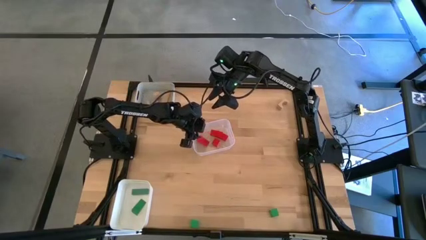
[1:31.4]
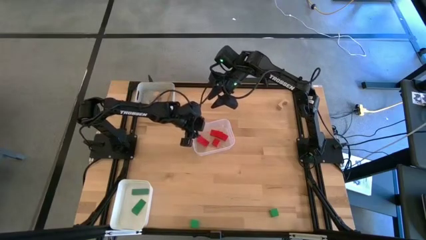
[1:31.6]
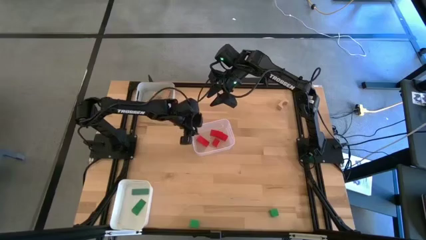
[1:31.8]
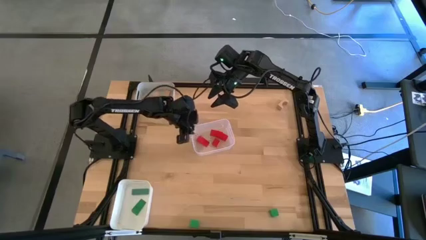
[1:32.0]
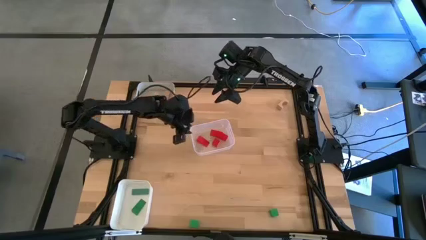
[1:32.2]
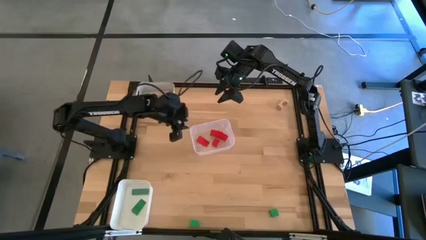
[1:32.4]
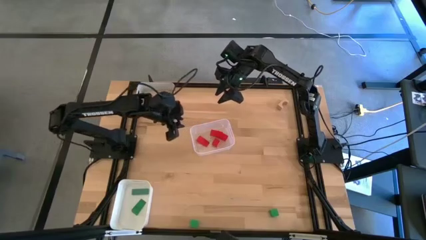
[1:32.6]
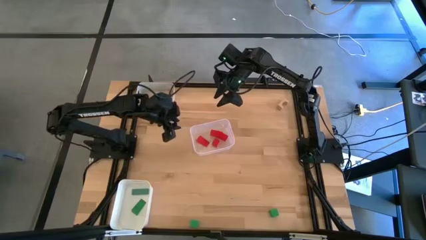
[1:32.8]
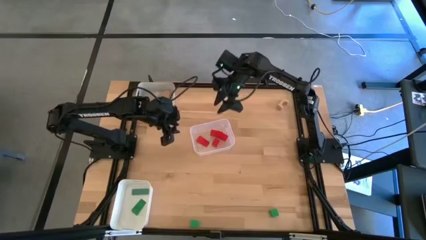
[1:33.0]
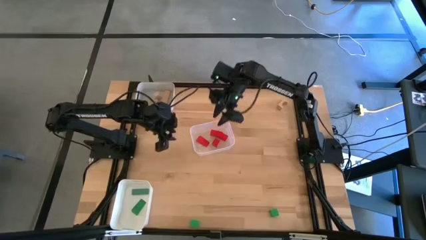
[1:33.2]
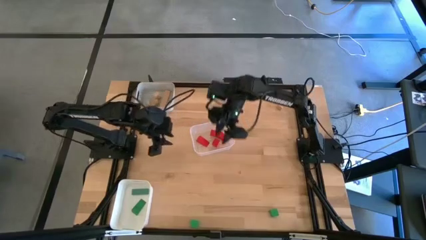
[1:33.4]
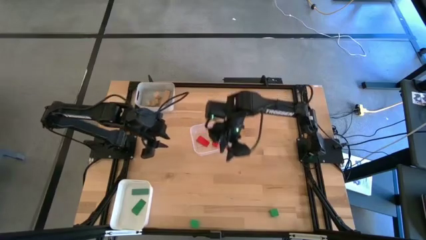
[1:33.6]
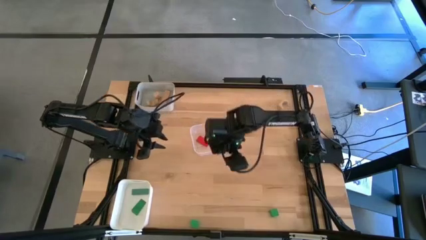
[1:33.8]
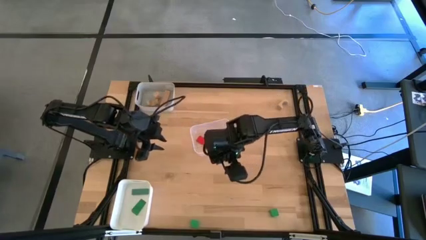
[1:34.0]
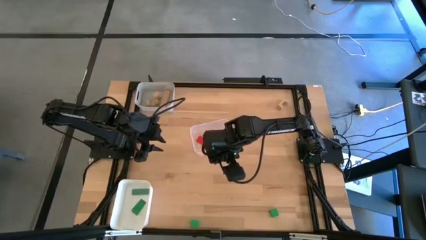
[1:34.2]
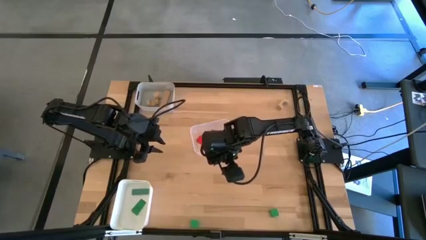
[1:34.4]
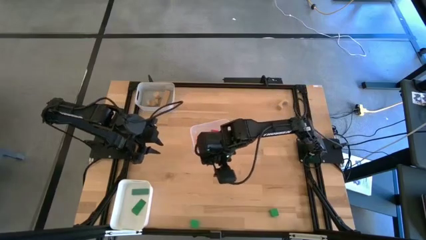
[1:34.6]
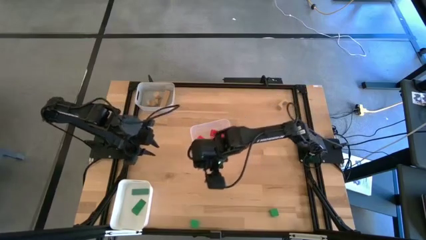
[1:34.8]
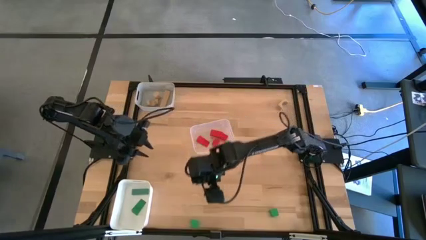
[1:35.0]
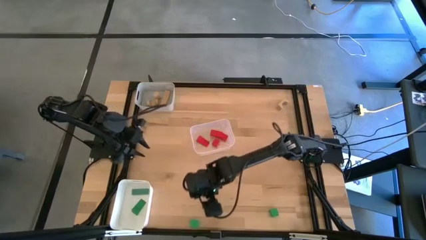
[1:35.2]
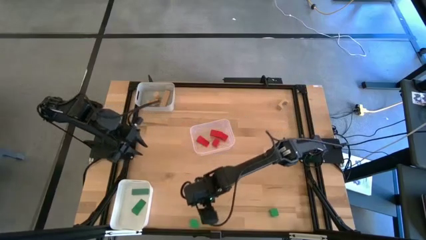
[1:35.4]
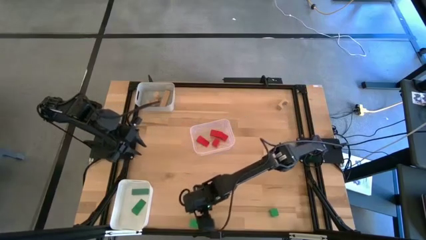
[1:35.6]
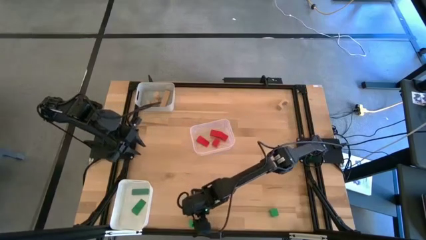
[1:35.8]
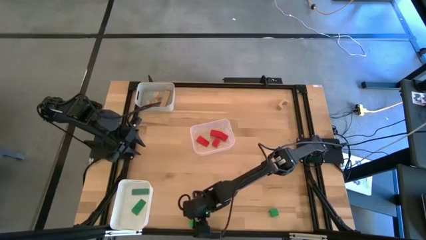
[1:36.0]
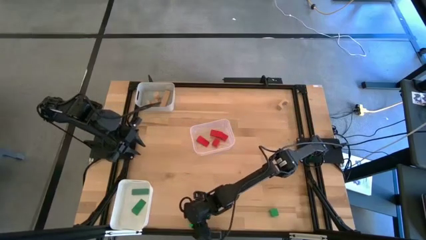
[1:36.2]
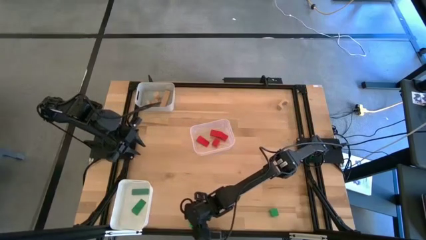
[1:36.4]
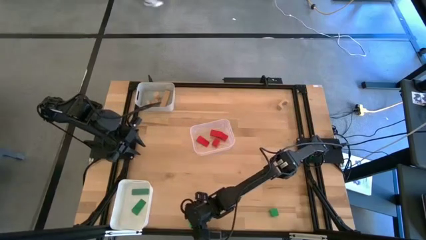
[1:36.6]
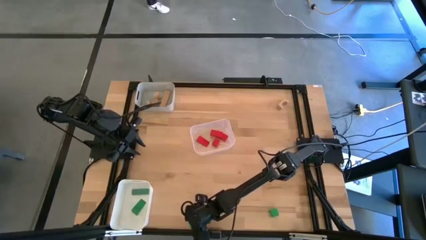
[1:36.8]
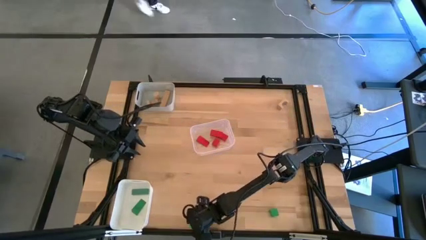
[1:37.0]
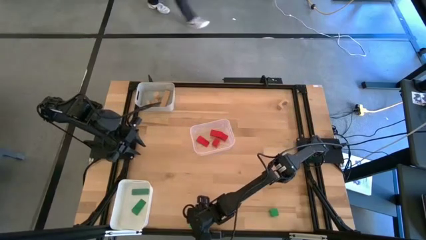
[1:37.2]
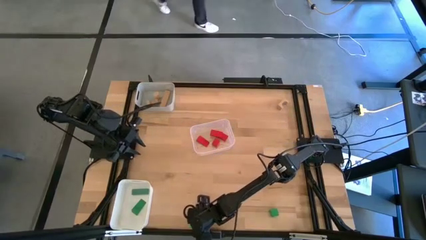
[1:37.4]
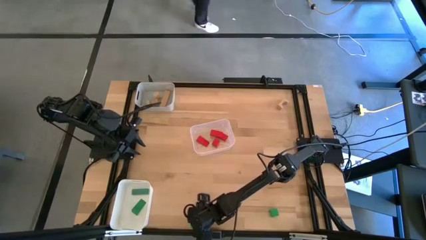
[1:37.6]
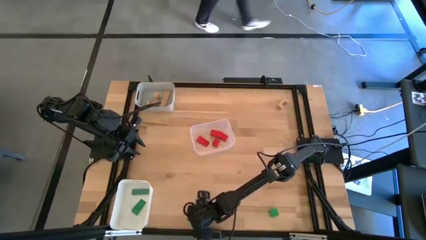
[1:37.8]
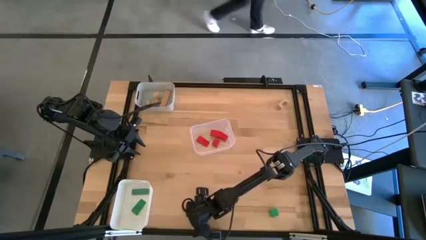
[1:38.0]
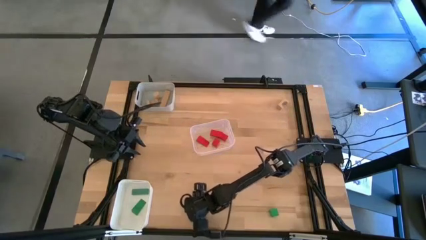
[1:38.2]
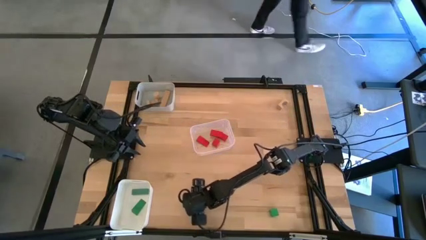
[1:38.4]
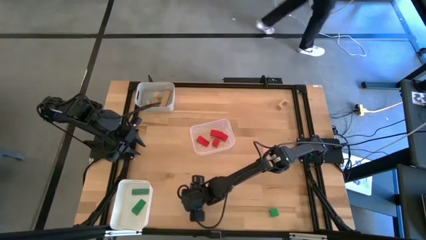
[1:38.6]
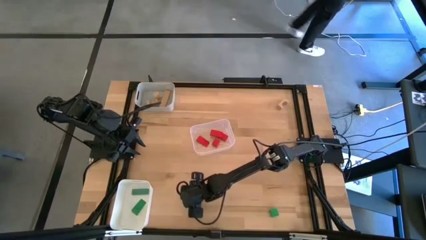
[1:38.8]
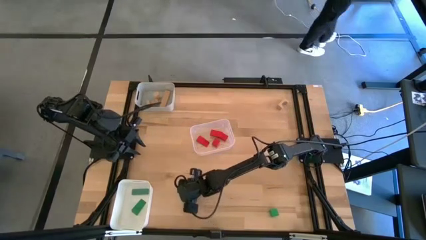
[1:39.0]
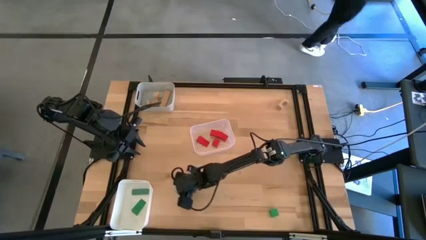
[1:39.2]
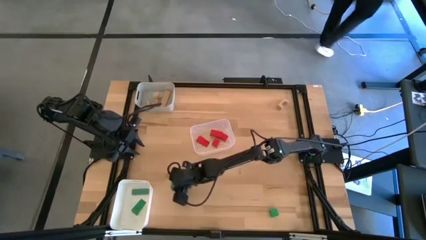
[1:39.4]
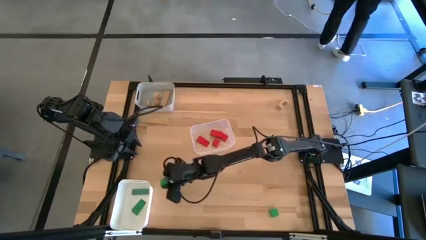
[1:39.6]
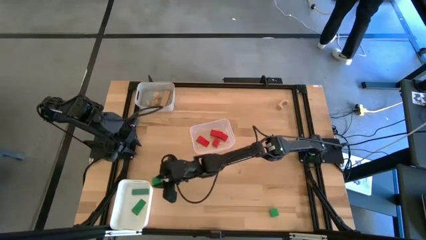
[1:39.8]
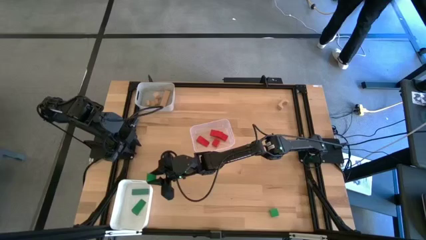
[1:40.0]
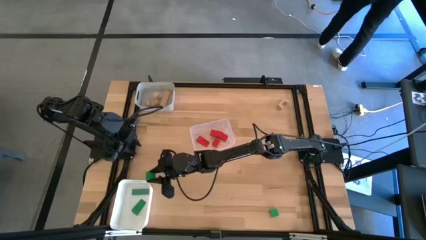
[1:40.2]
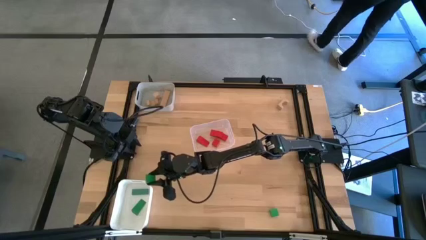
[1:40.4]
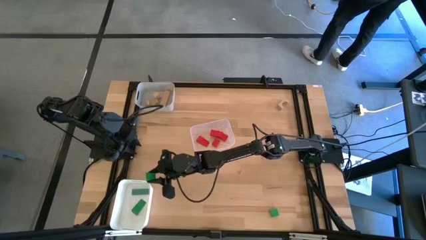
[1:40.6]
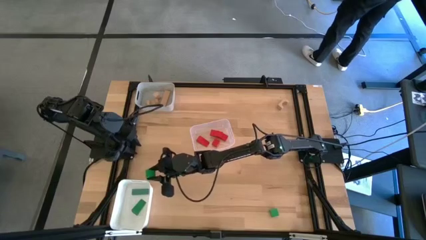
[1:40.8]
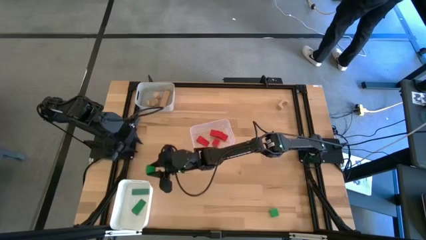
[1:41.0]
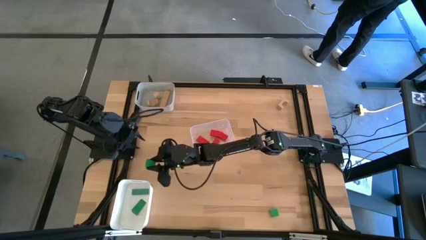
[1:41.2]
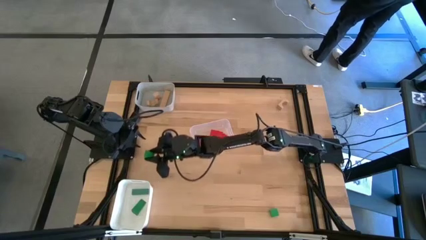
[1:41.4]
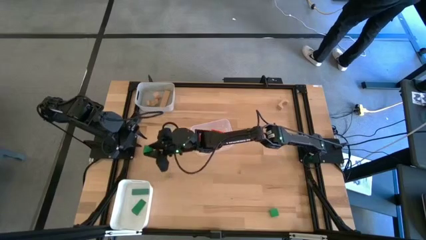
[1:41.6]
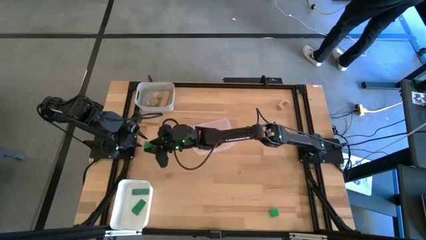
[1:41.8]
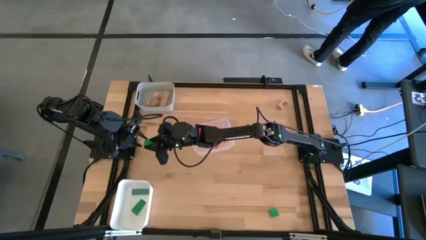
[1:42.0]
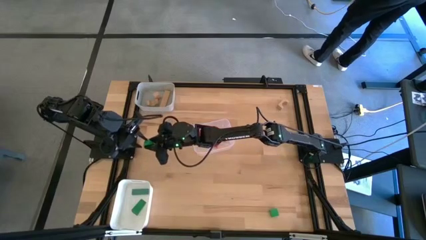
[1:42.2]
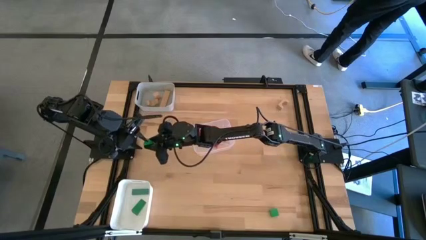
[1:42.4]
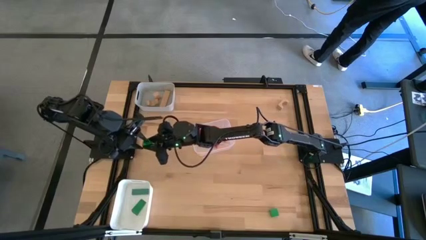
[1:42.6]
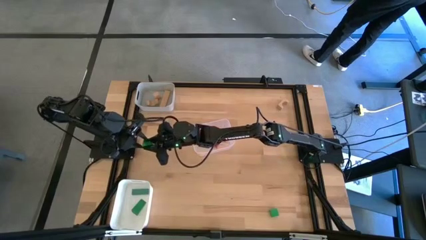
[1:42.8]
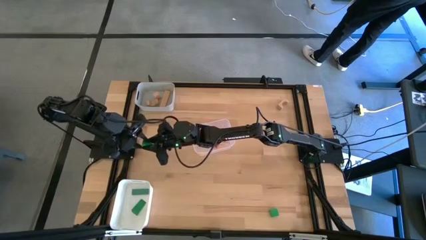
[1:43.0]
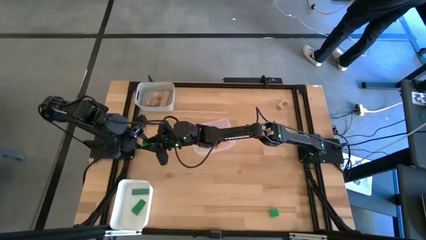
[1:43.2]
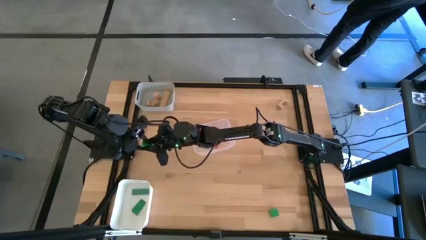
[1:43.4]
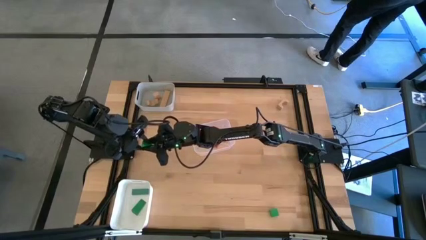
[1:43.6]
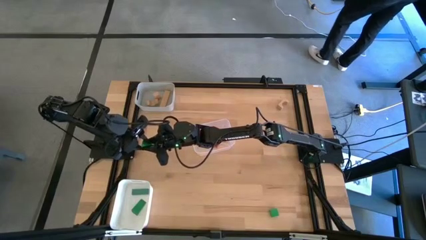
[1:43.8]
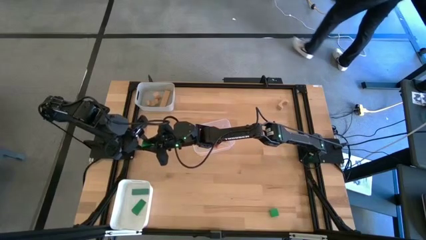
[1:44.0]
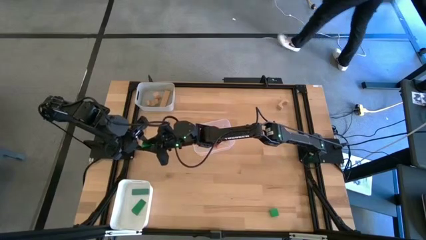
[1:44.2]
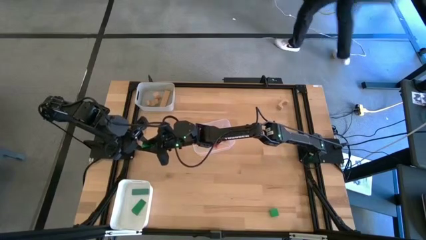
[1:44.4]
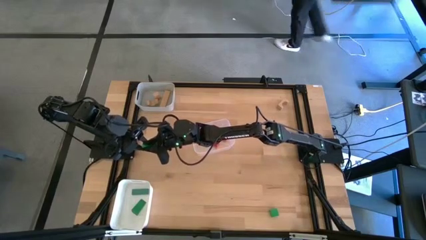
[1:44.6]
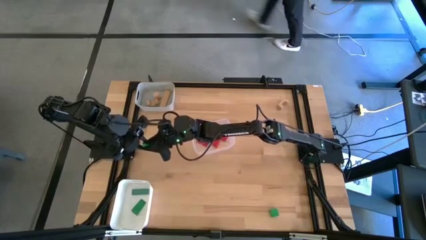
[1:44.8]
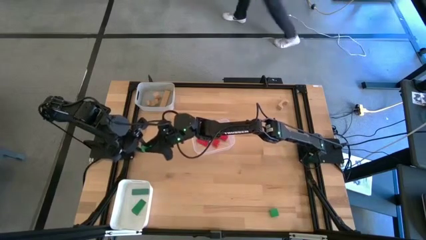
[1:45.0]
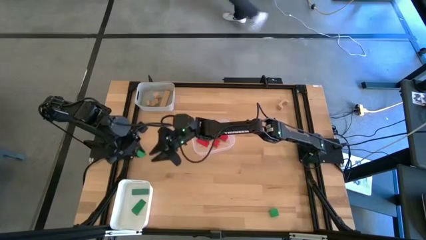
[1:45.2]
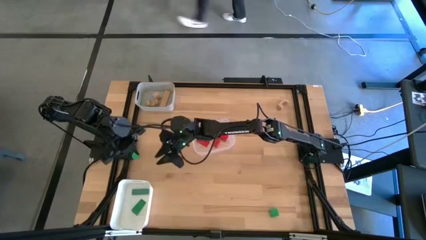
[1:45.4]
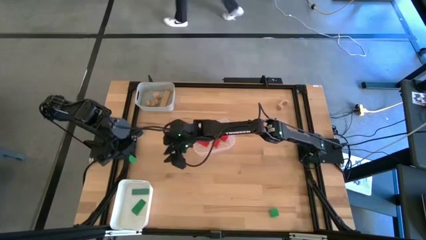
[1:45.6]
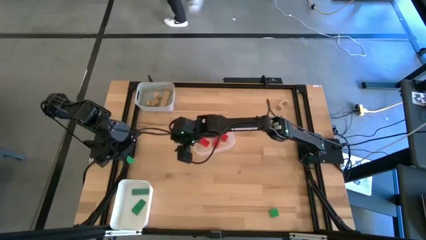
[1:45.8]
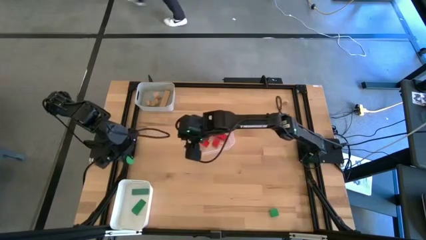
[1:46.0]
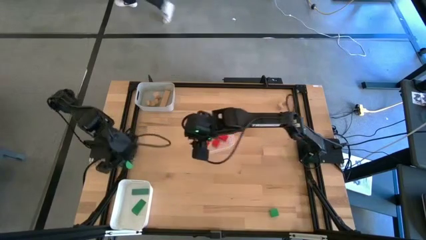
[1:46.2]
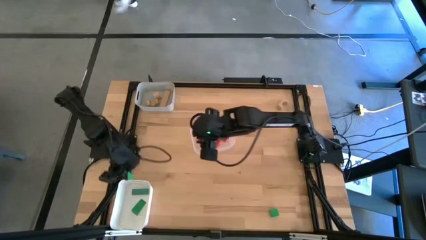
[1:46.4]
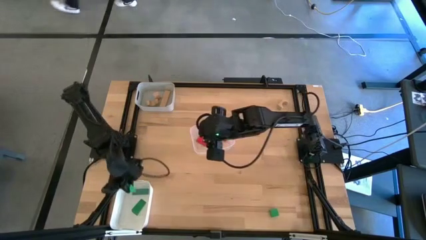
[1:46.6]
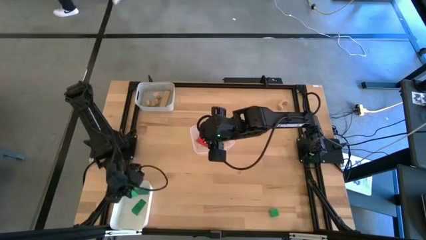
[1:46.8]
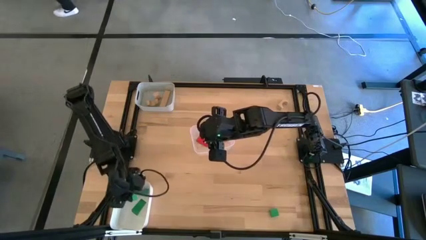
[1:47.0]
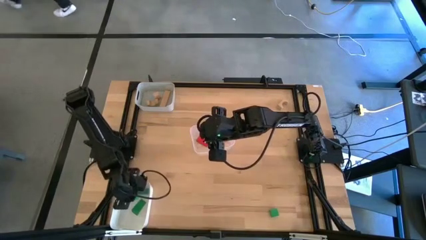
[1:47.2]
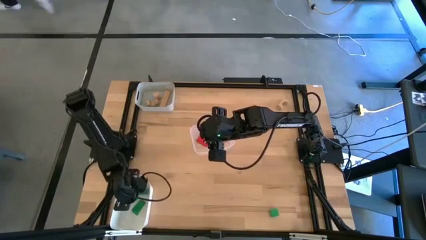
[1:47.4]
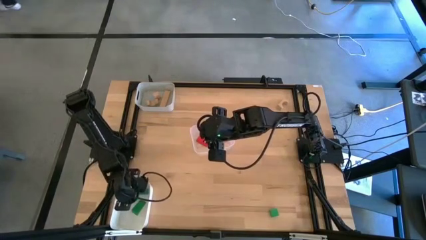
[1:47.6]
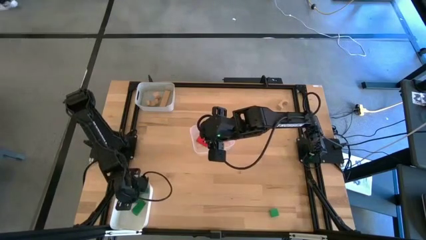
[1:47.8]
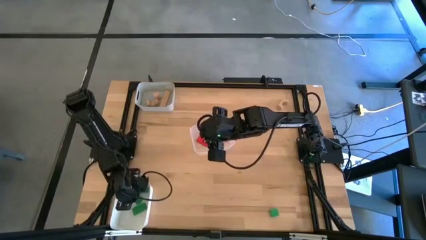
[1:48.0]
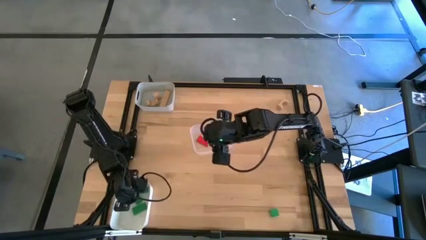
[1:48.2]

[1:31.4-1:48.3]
Task: Sort & place blocks by color
Put the green block into the white bin
